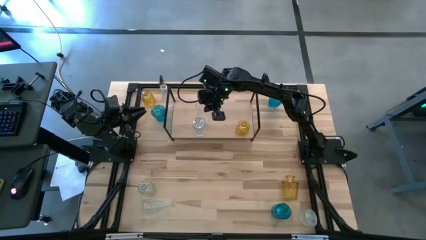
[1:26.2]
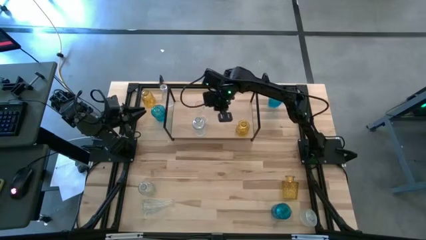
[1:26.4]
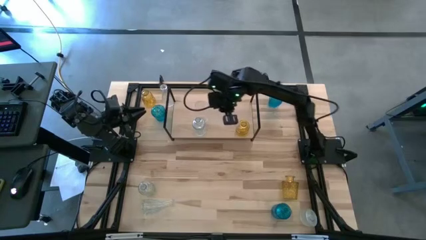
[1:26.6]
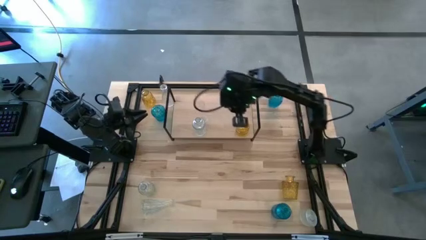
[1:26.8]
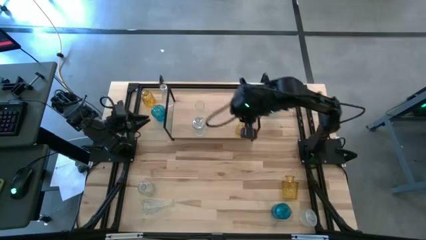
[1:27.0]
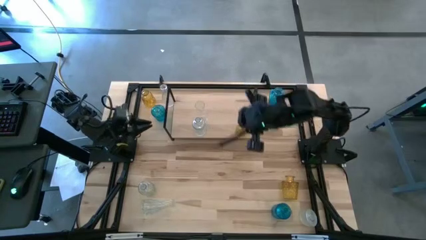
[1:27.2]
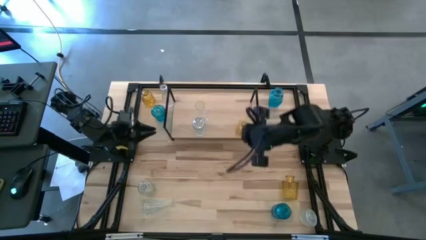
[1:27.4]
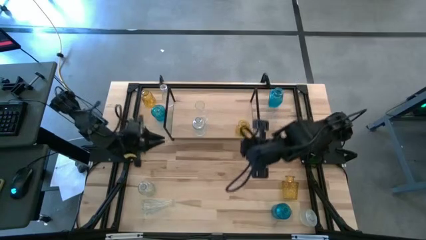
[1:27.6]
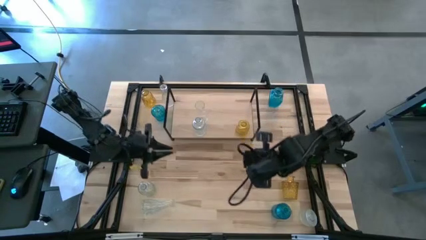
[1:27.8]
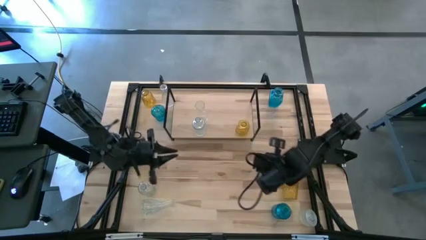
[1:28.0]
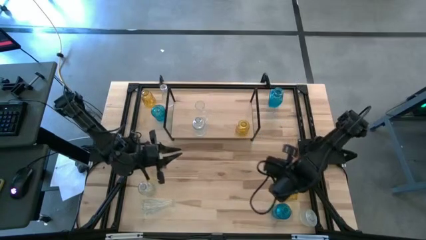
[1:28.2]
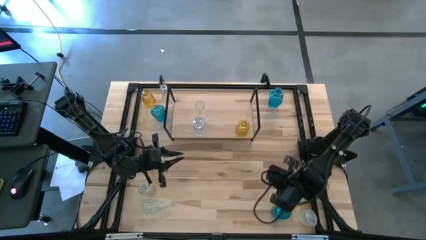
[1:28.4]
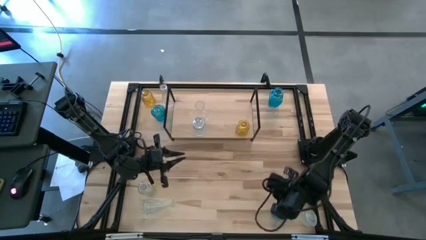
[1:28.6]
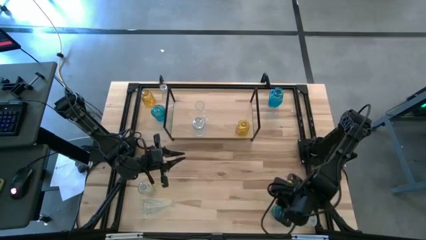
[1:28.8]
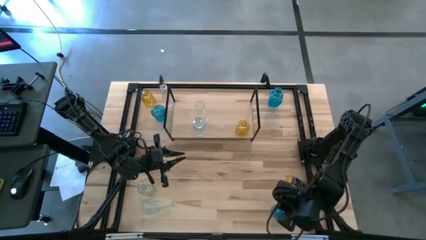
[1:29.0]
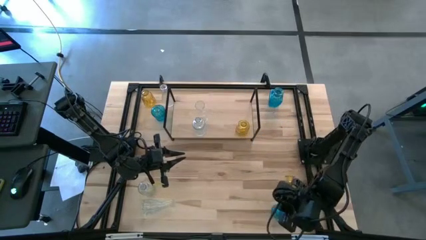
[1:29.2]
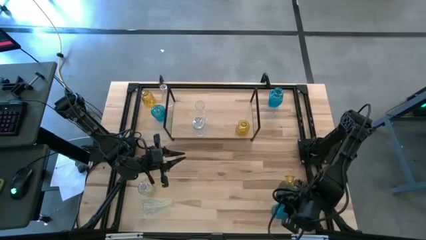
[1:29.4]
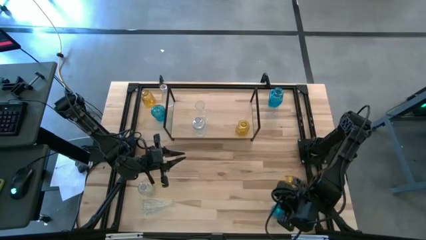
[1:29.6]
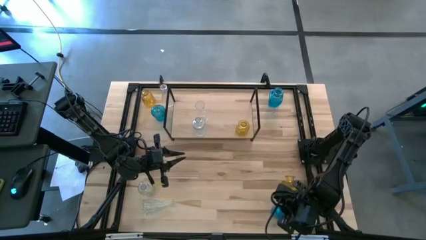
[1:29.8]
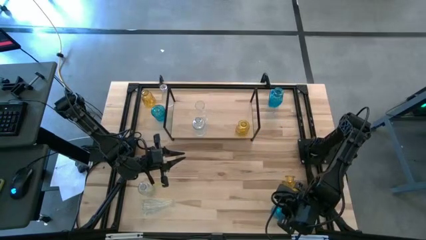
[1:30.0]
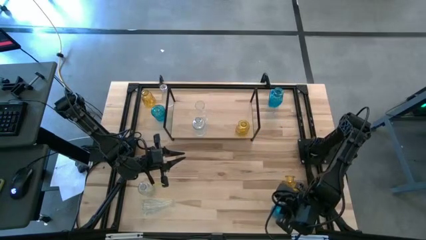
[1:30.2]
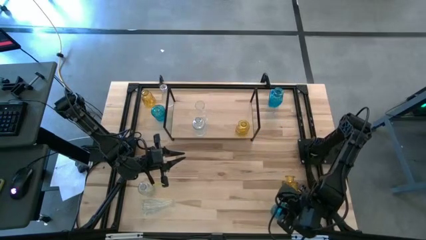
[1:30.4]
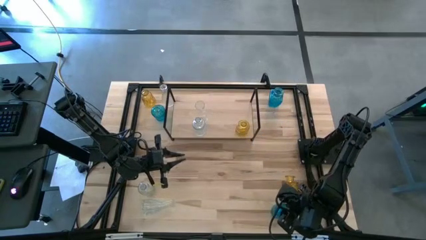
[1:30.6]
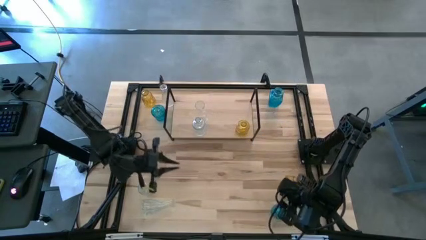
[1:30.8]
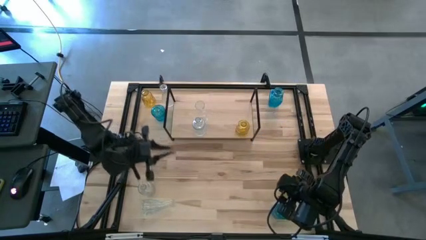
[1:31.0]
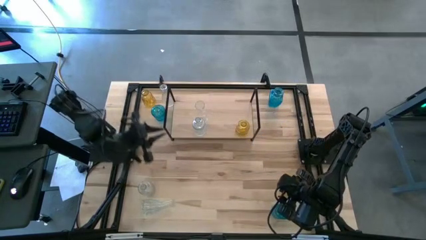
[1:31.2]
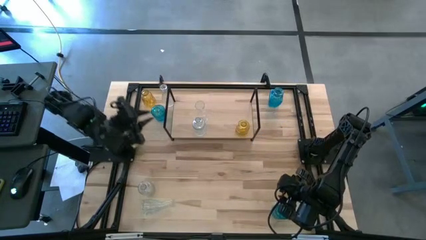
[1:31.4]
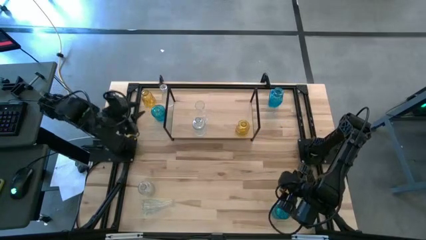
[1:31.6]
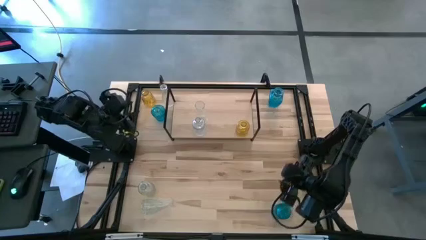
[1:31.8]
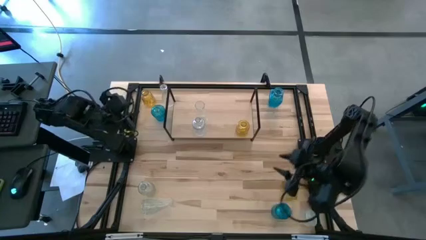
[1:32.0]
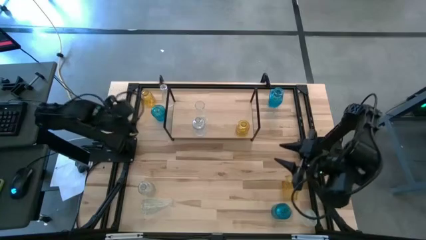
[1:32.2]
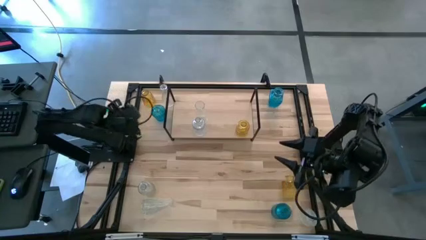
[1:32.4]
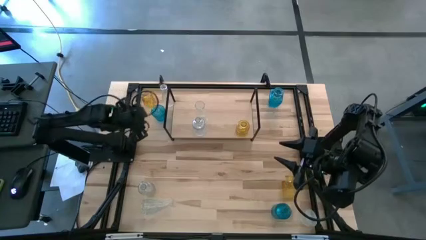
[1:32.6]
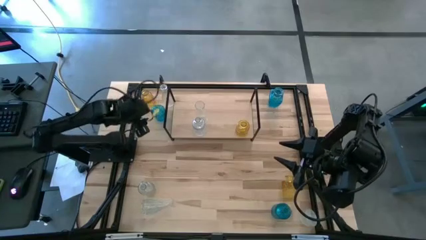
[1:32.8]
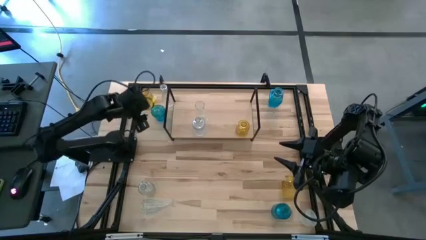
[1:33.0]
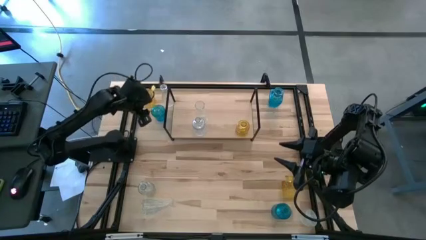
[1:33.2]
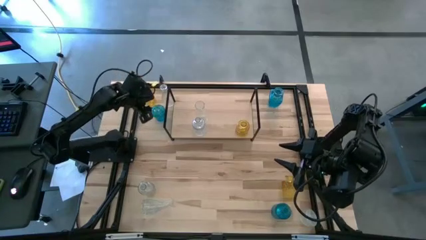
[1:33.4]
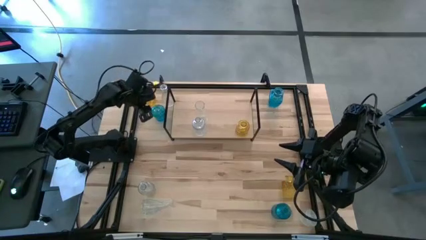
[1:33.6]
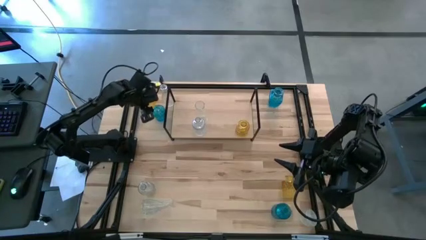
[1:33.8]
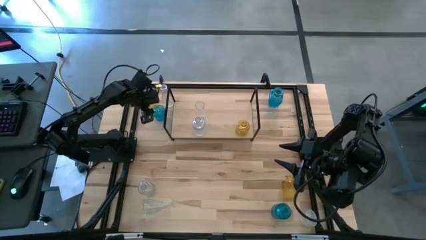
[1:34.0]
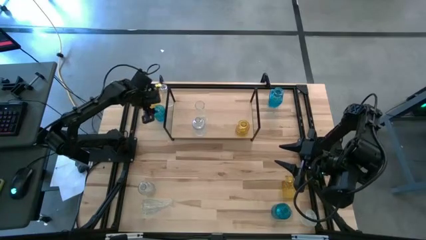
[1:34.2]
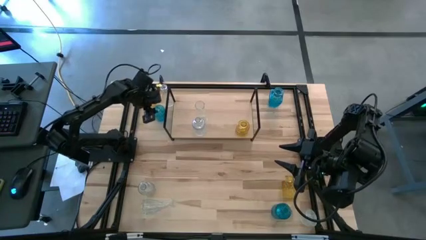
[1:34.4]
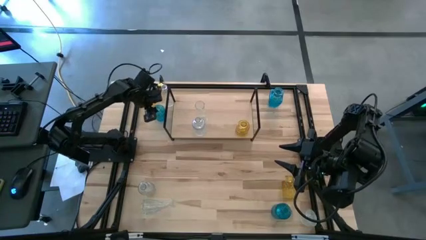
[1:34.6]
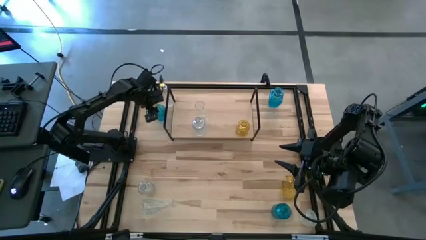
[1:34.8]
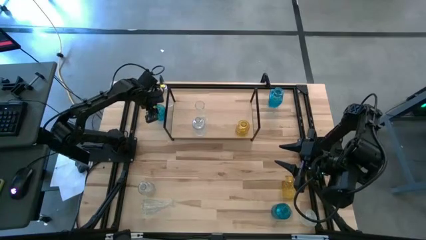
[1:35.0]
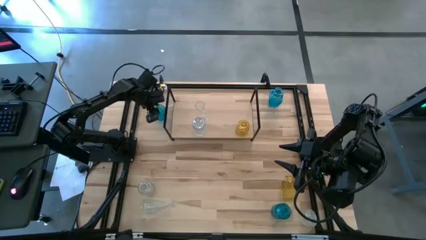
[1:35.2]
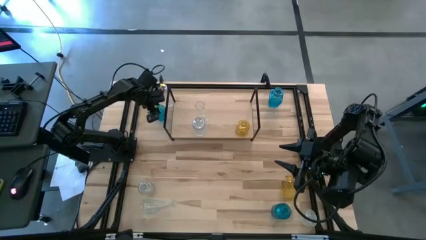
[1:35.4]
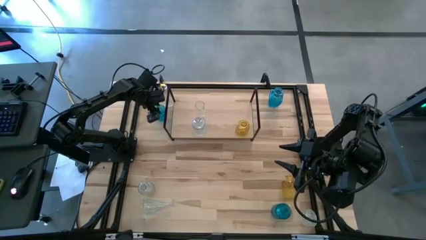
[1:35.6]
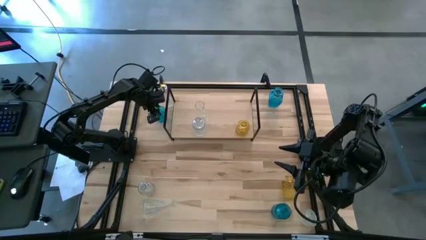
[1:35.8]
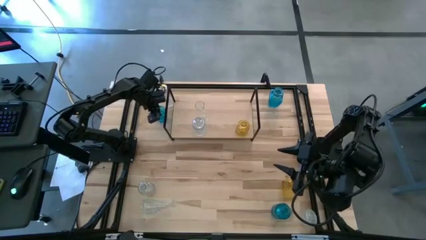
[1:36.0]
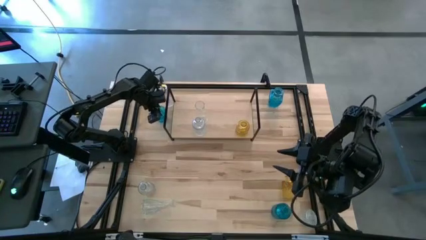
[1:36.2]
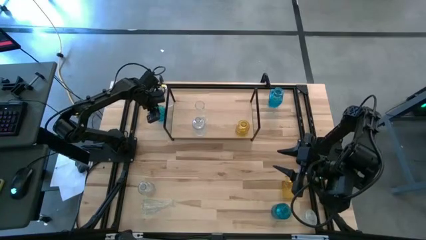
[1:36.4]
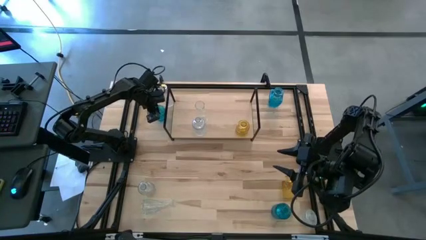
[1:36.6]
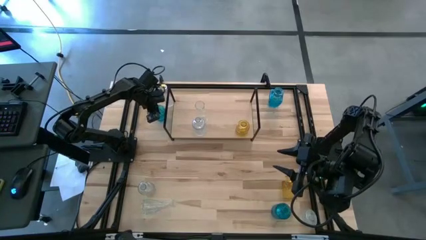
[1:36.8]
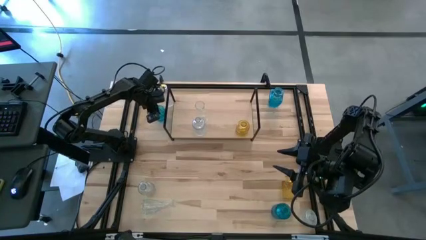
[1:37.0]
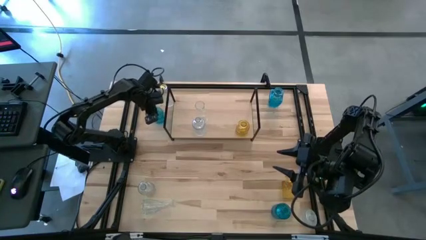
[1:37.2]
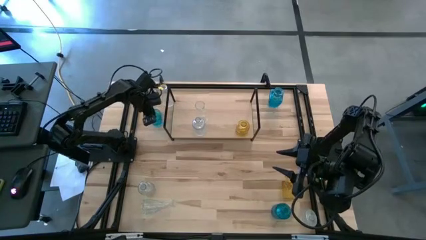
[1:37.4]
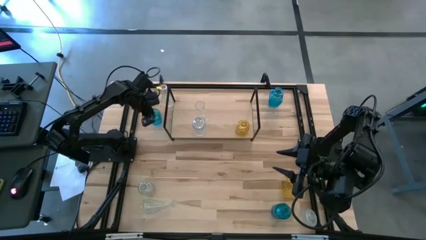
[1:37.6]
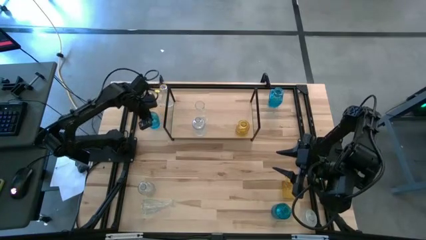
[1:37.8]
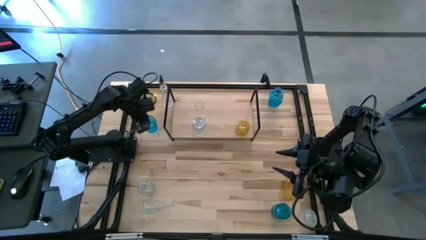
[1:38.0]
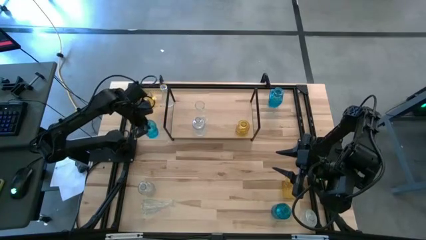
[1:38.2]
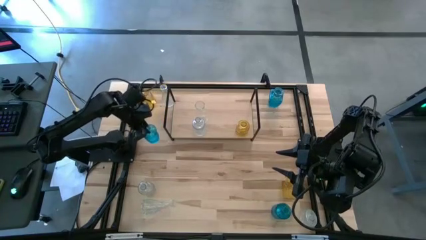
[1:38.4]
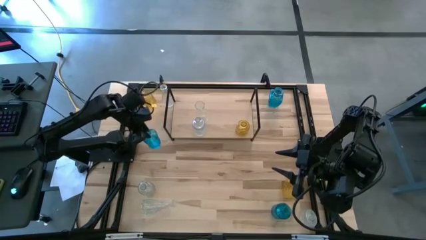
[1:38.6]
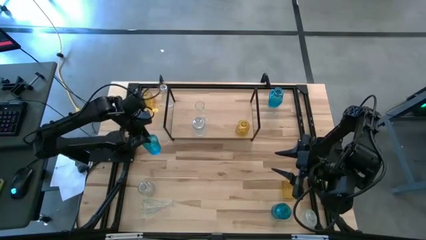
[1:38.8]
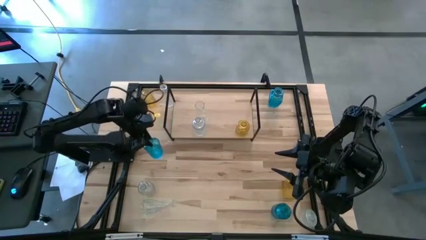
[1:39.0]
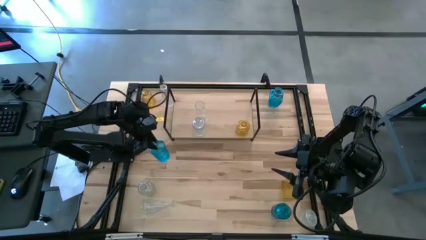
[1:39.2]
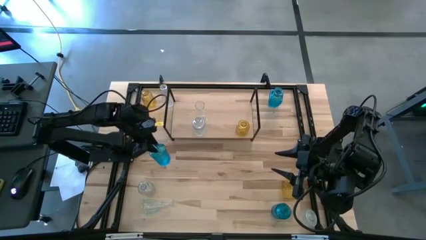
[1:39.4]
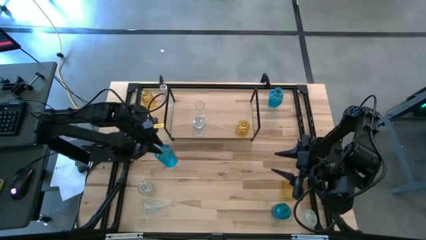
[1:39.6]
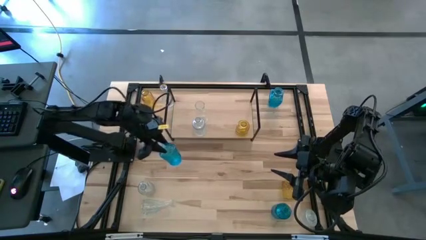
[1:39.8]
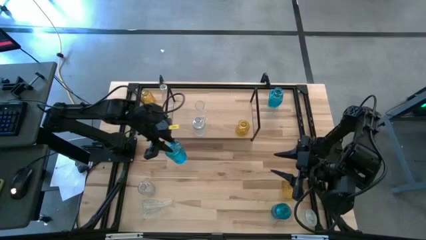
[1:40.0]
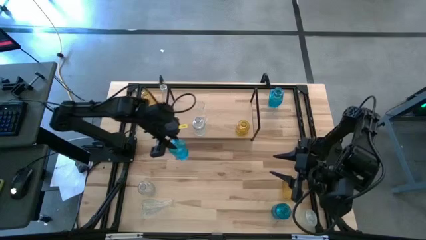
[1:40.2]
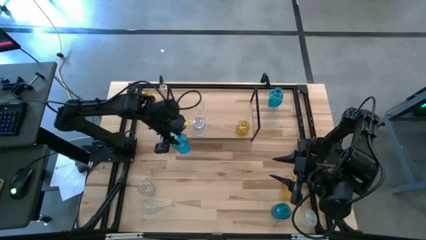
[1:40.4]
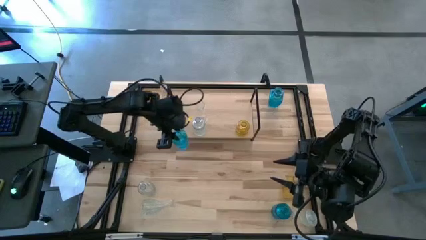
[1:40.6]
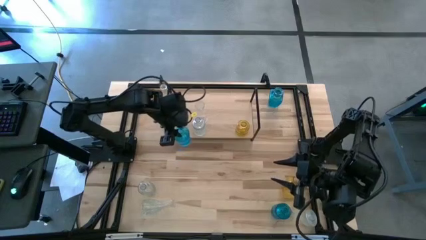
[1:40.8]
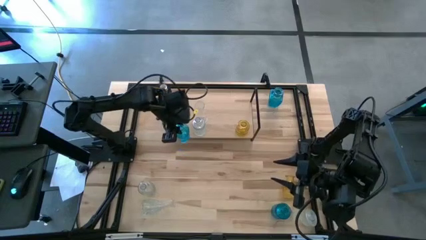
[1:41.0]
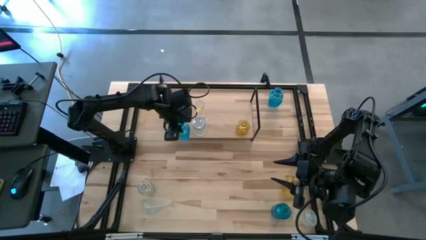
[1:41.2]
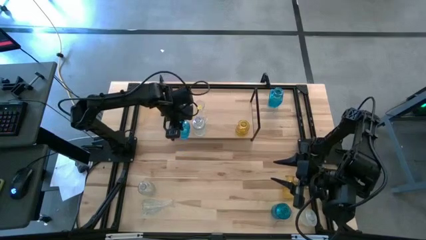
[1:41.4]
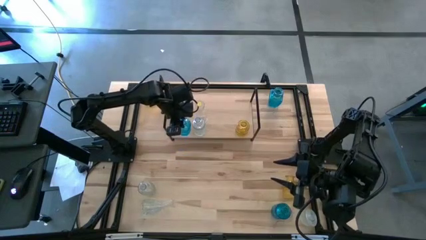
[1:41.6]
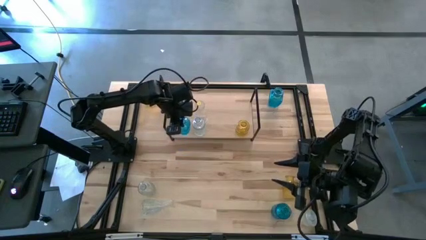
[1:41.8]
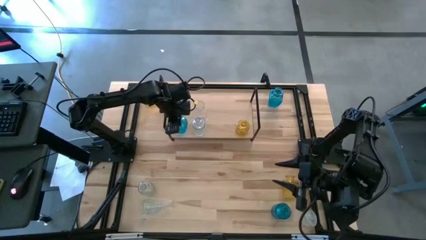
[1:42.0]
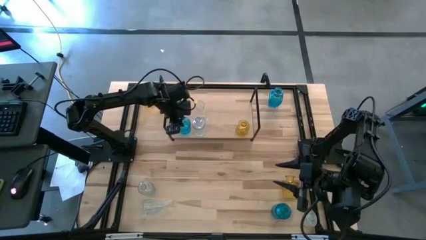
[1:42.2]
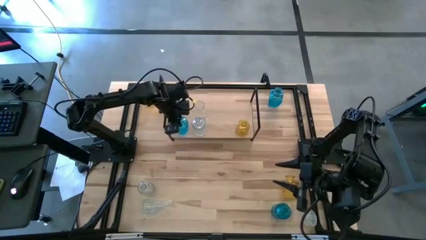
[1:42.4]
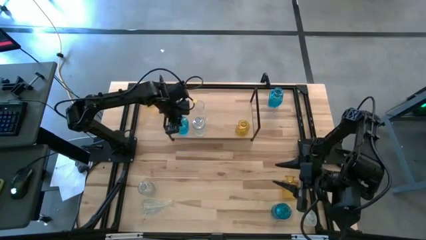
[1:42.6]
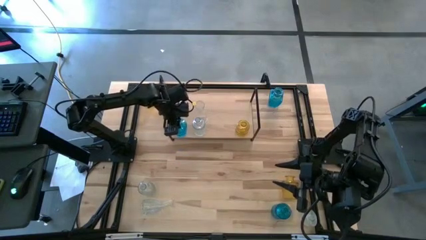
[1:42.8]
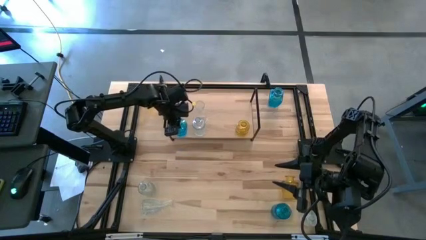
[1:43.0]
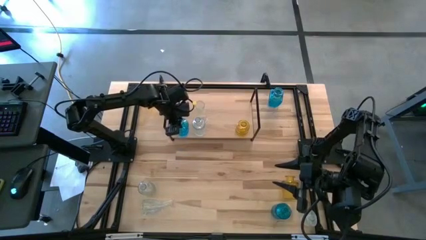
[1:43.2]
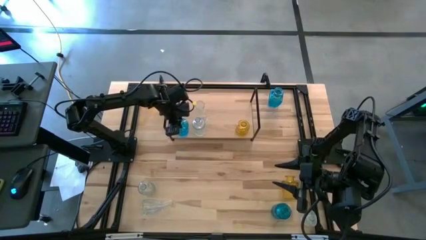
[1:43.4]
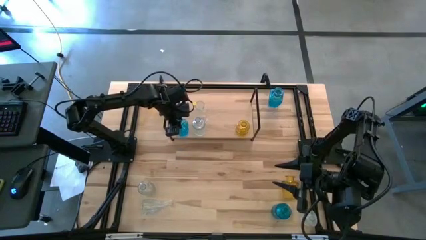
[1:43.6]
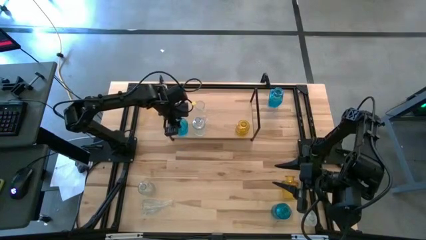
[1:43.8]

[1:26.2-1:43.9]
Task: sort vases onto shelf
Put the blue vase on the shelf
